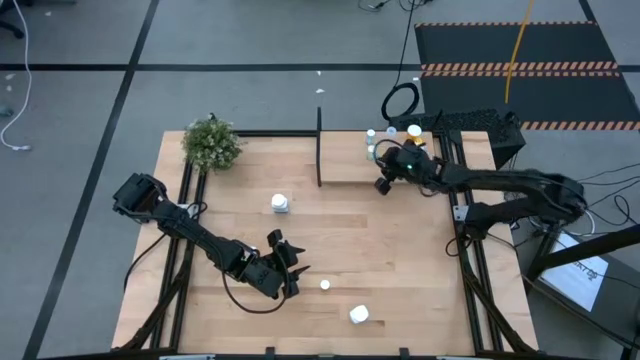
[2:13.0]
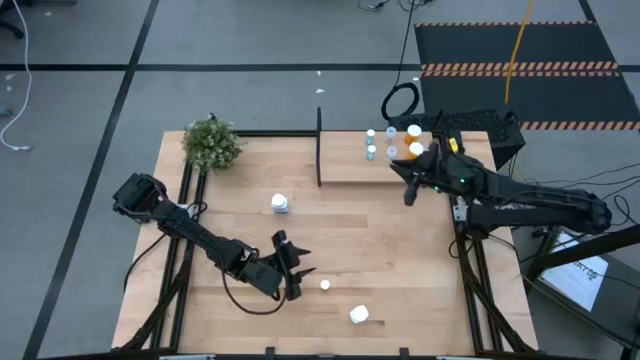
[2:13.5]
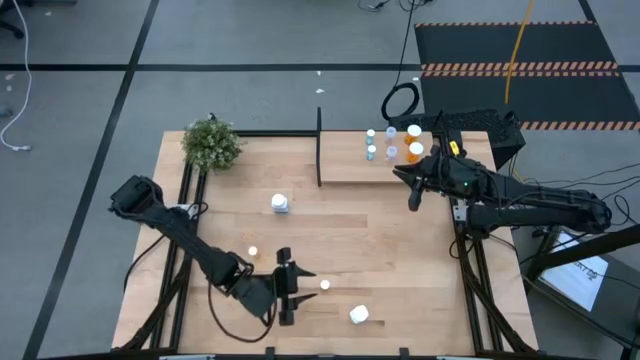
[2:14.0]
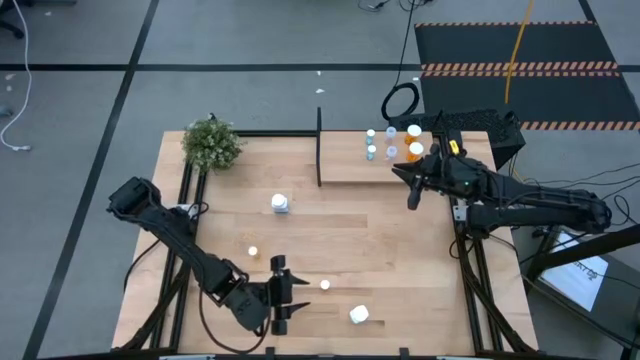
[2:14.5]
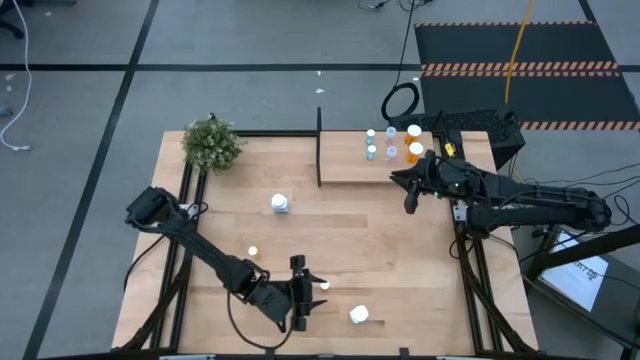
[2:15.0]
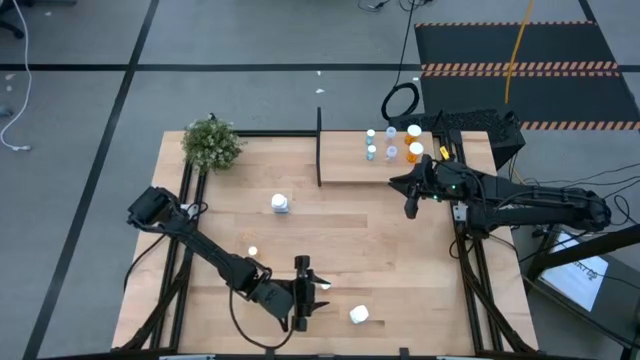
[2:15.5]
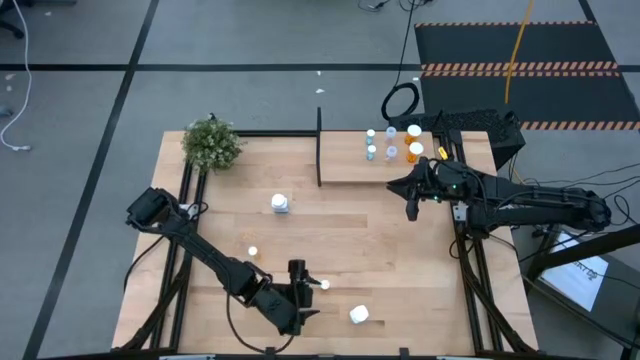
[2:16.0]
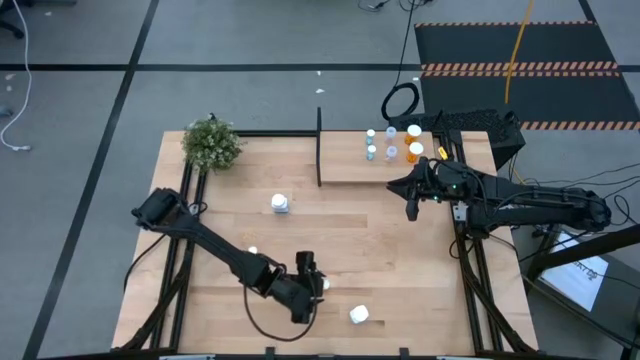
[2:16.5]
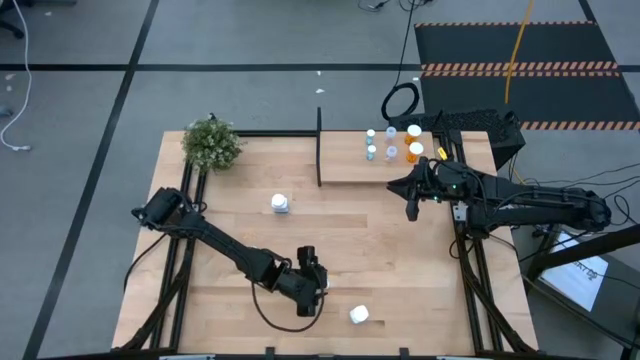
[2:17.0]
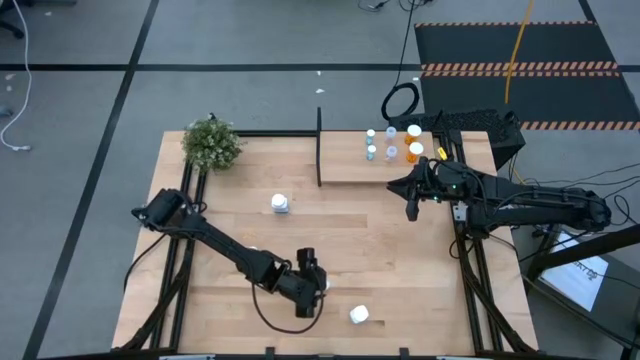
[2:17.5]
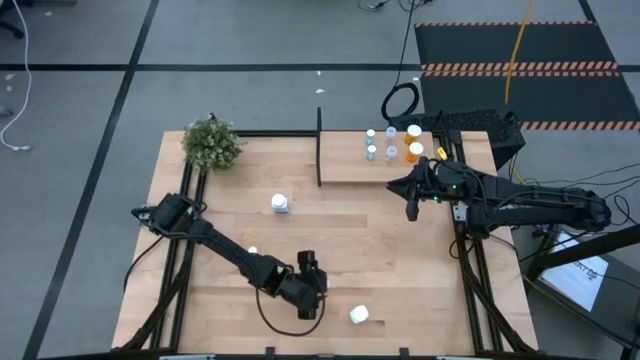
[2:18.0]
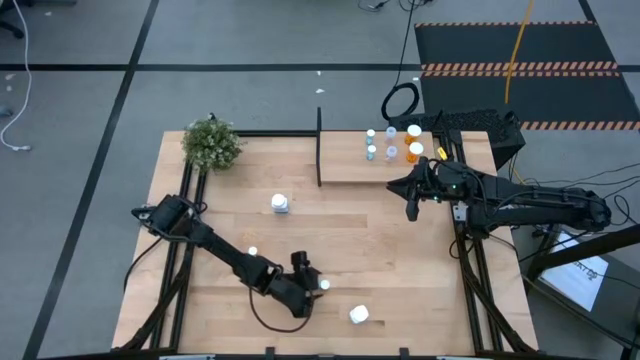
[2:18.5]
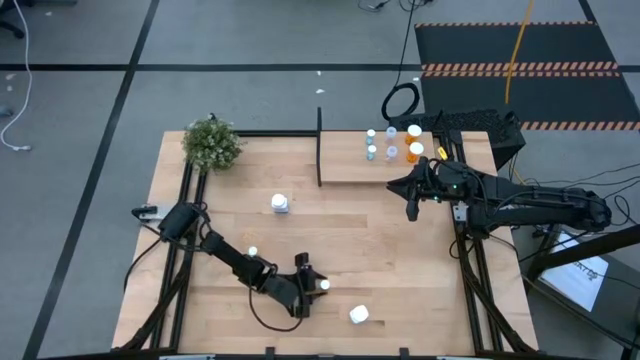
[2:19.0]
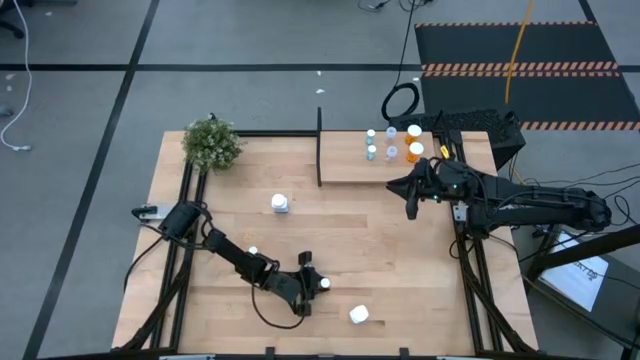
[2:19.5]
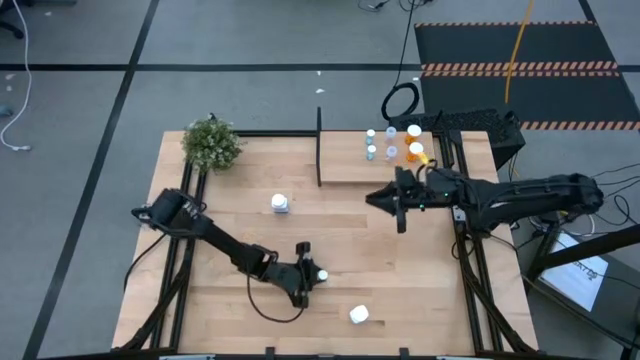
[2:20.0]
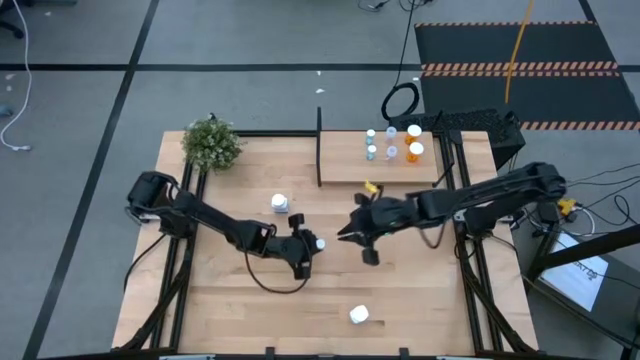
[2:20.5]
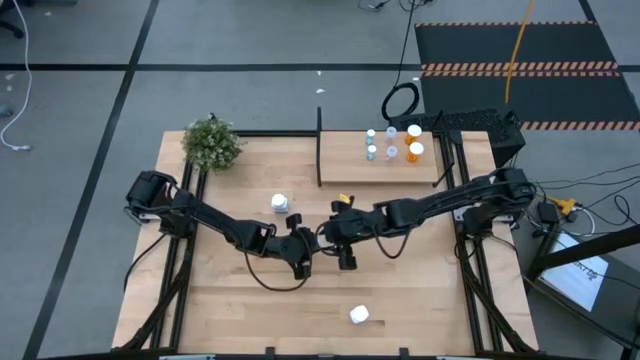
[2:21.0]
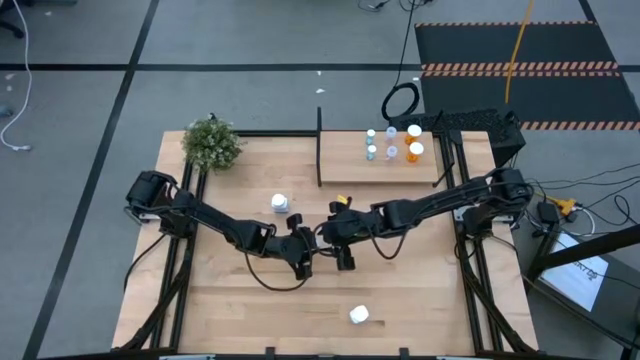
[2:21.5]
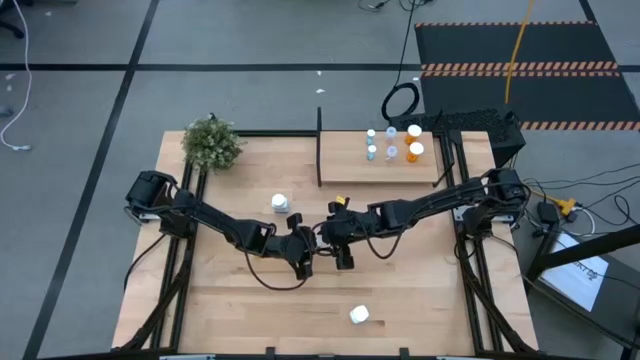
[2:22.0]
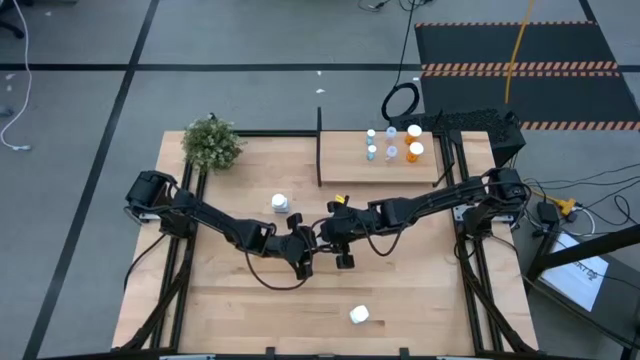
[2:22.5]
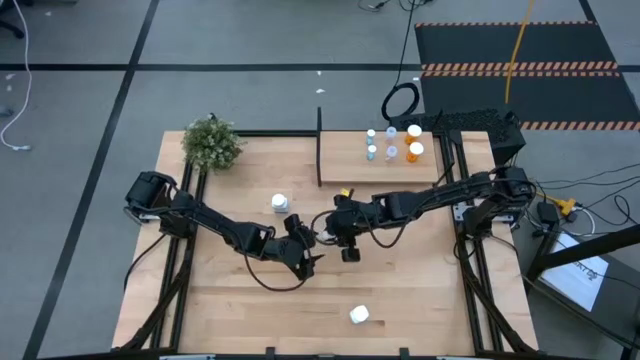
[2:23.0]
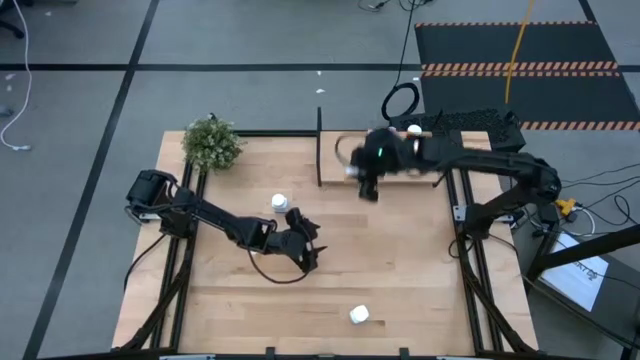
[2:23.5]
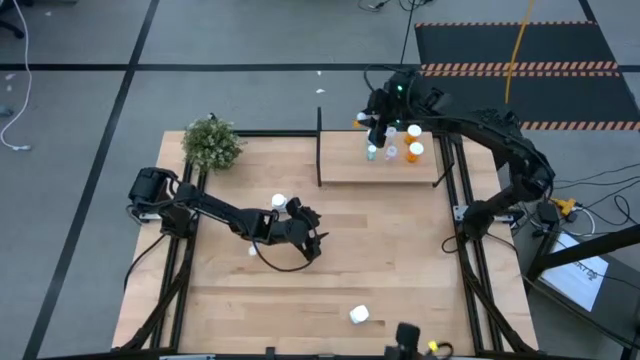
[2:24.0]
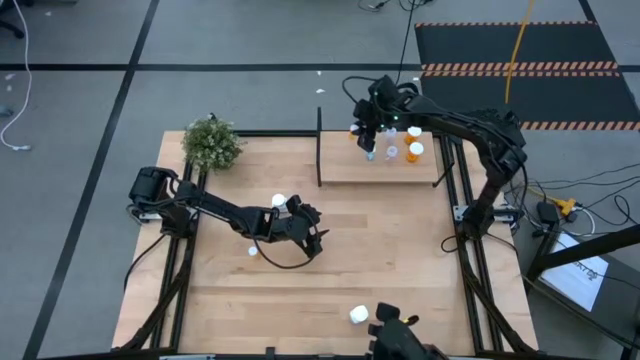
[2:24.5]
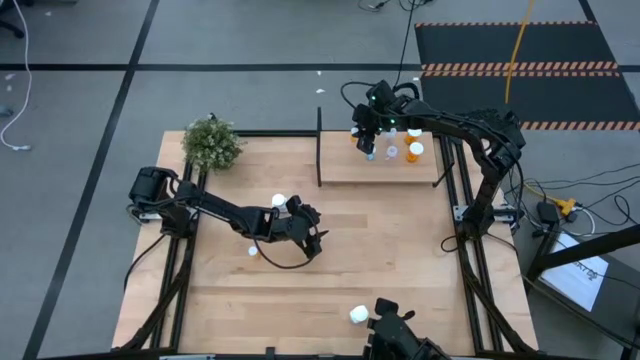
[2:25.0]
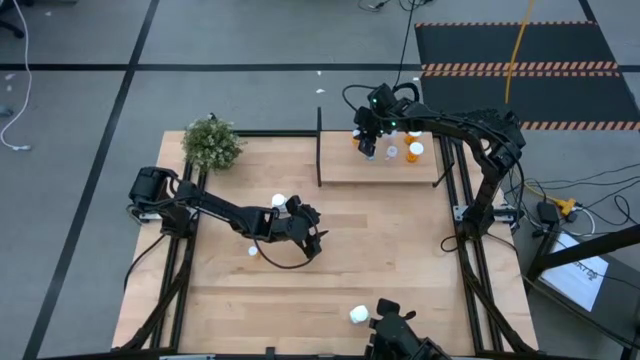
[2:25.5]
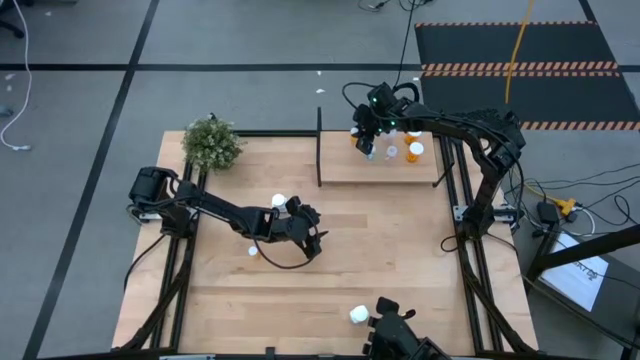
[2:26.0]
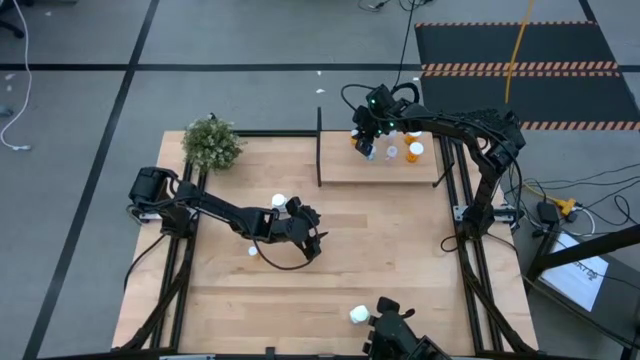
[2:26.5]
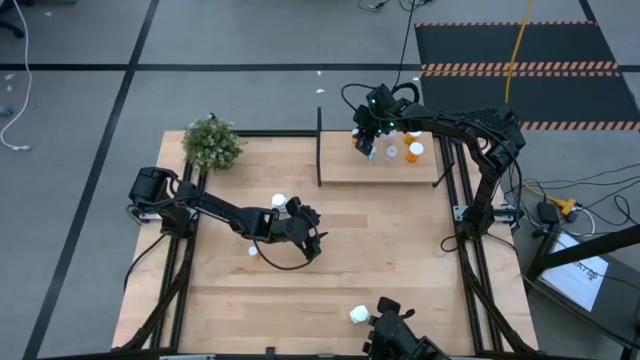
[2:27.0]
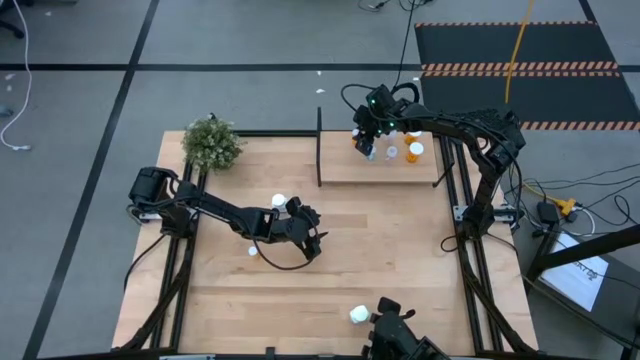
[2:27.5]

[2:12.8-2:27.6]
Task: Pick and place medicine bottles onto shelf by color
Put the right small orange pill bottle on the shelf

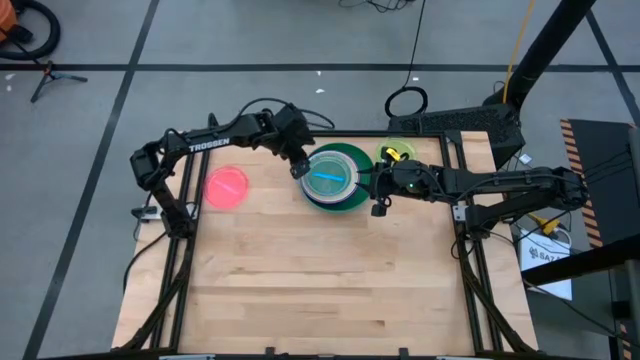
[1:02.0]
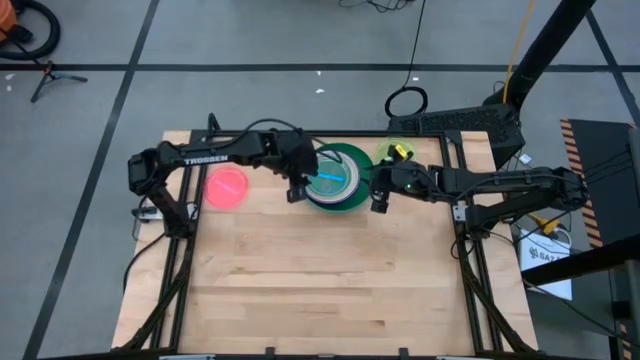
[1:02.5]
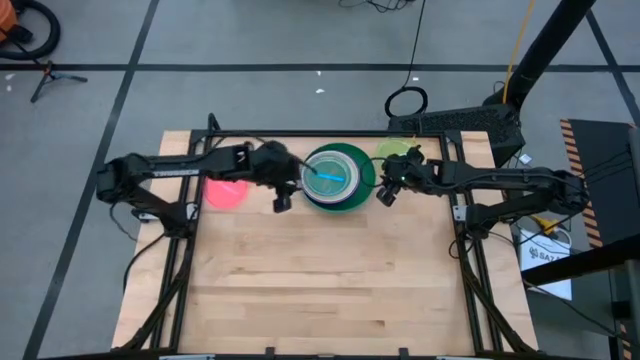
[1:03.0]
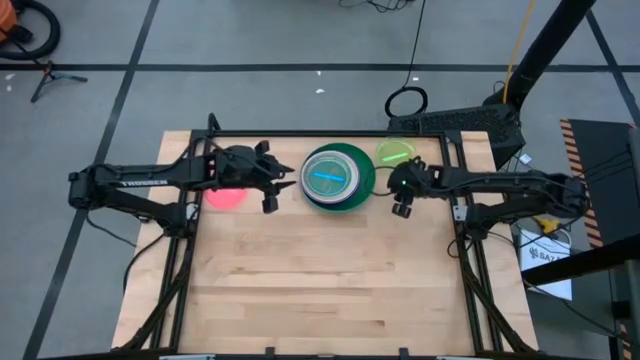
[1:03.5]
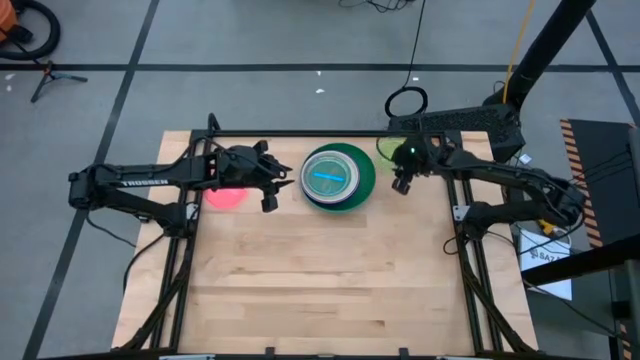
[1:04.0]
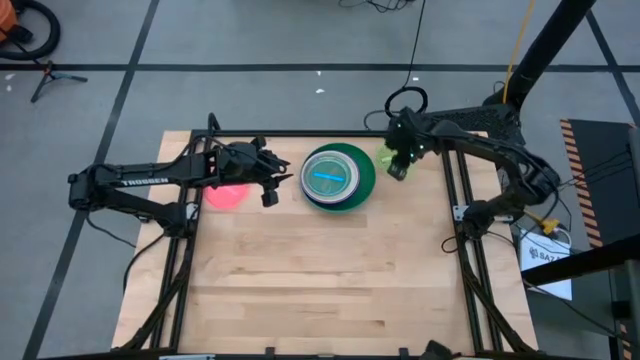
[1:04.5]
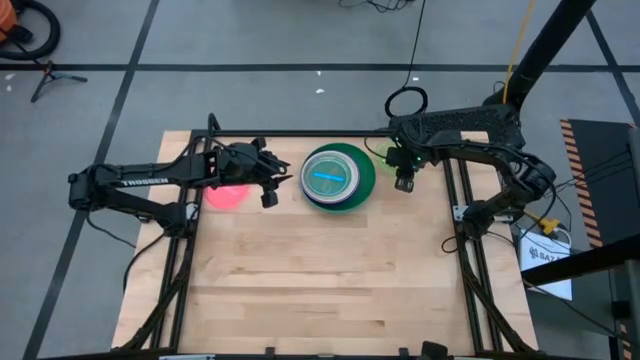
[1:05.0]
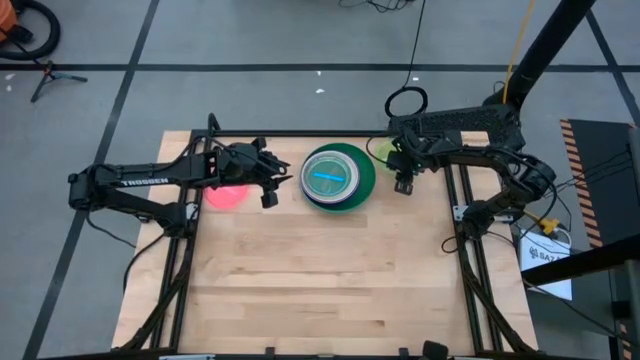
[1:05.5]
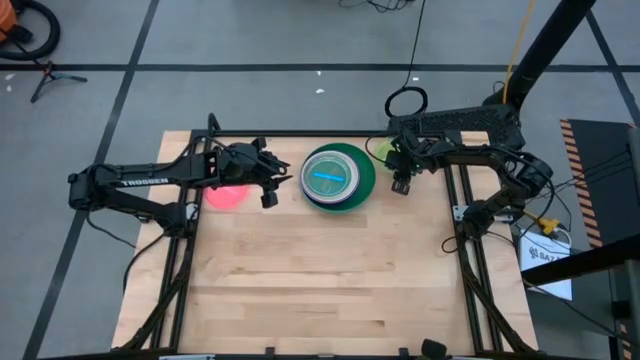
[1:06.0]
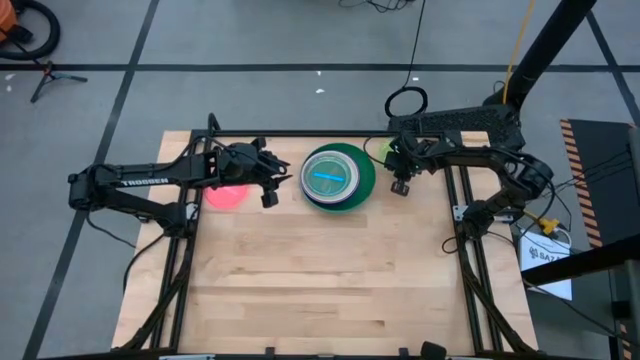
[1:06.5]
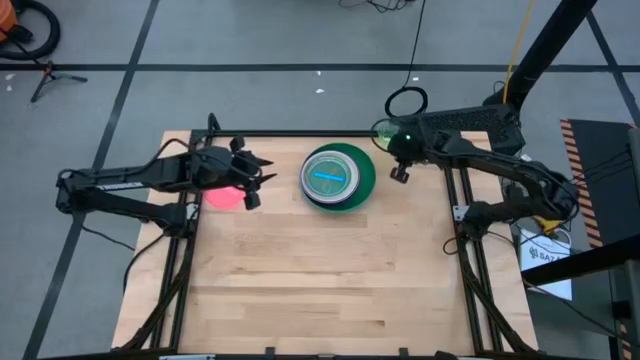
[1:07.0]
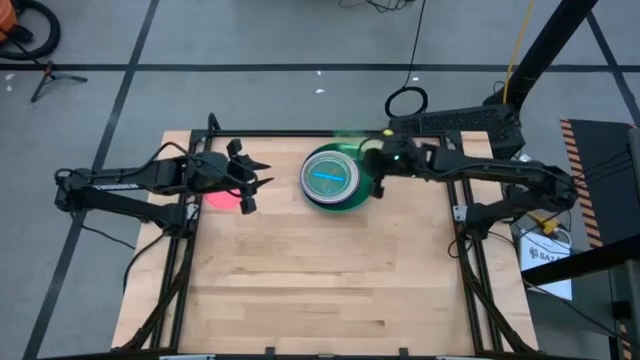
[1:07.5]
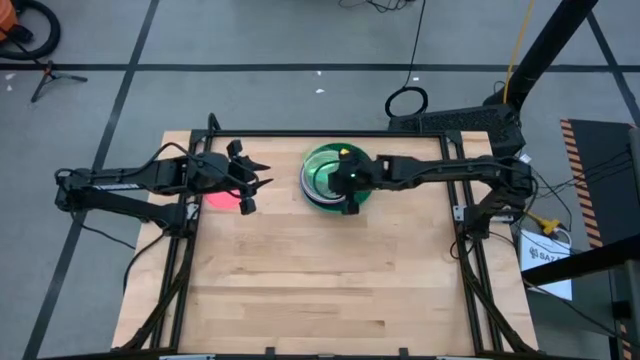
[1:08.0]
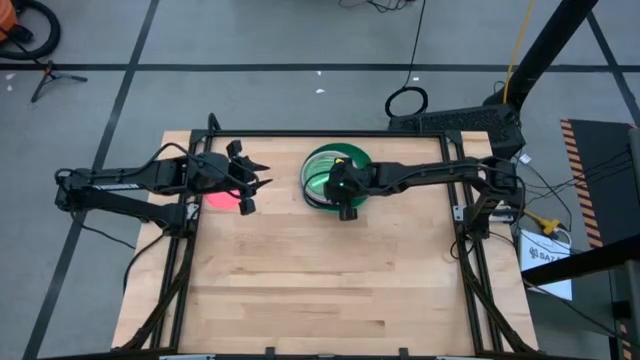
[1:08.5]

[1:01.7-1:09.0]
Task: Stack plastic plates
Stack the green plate on top of the blue plate
